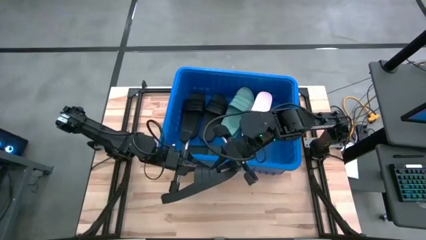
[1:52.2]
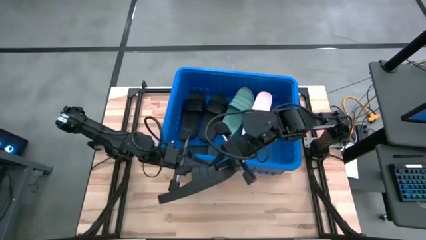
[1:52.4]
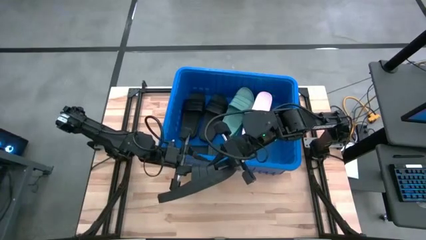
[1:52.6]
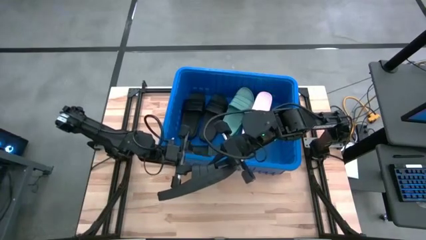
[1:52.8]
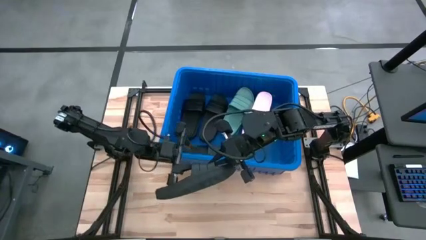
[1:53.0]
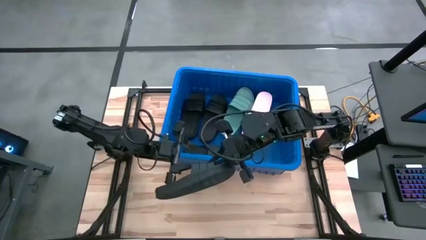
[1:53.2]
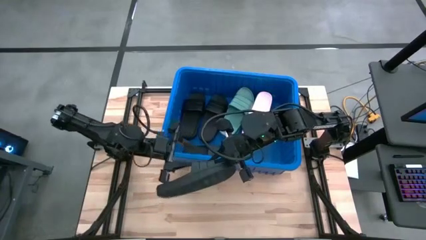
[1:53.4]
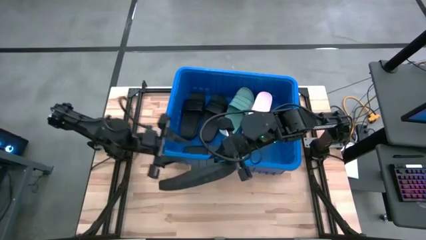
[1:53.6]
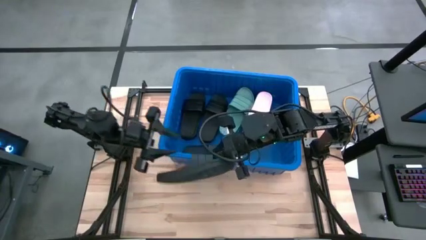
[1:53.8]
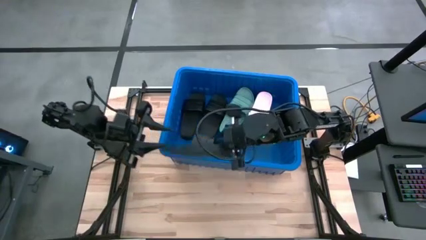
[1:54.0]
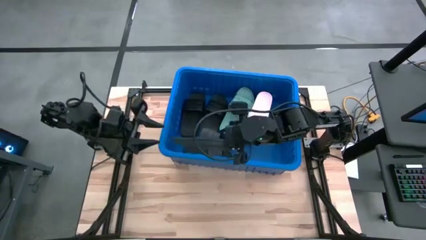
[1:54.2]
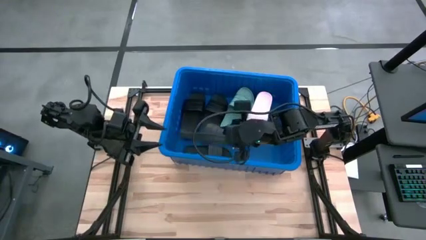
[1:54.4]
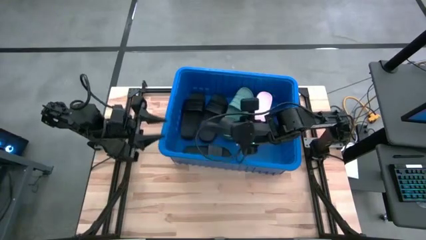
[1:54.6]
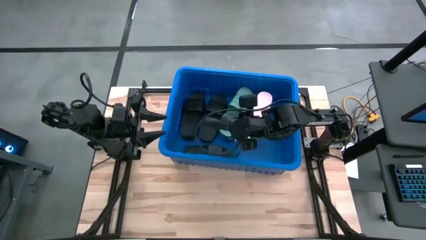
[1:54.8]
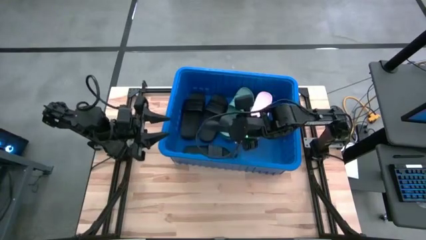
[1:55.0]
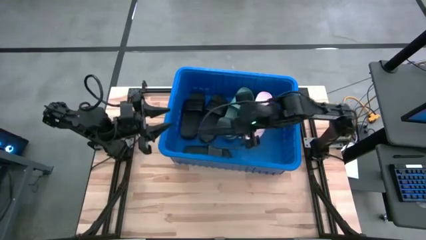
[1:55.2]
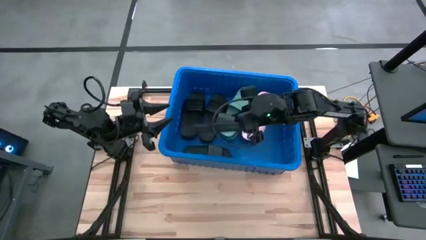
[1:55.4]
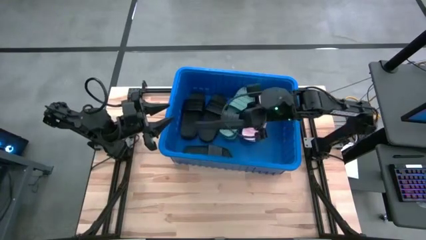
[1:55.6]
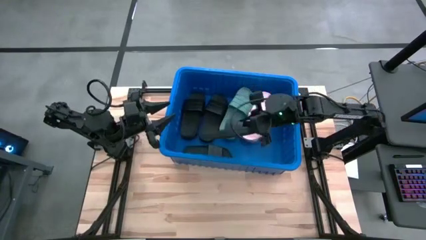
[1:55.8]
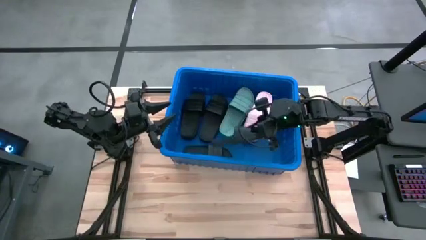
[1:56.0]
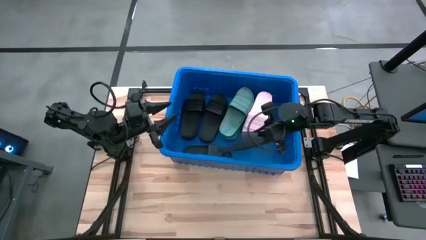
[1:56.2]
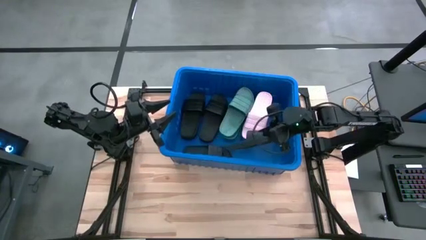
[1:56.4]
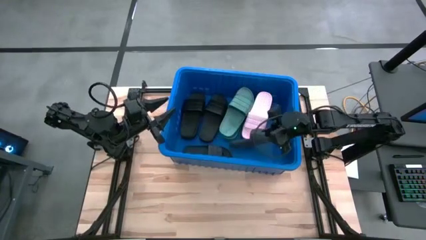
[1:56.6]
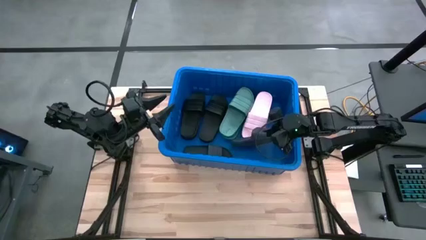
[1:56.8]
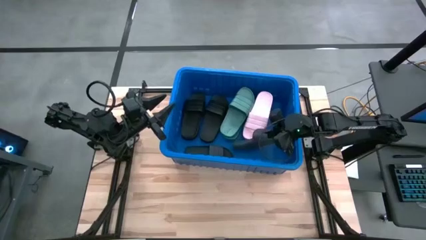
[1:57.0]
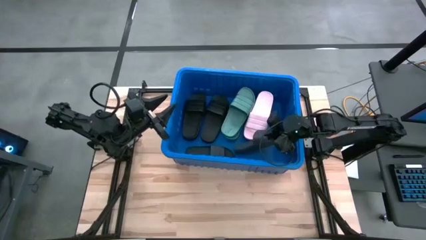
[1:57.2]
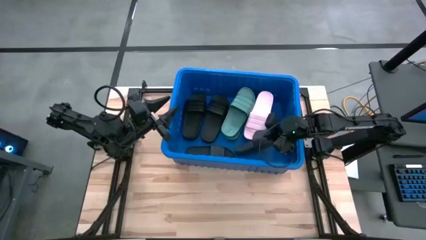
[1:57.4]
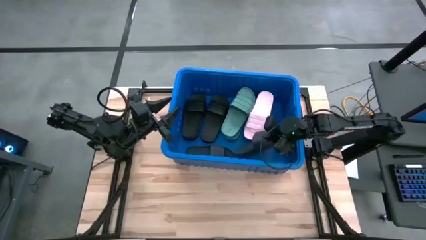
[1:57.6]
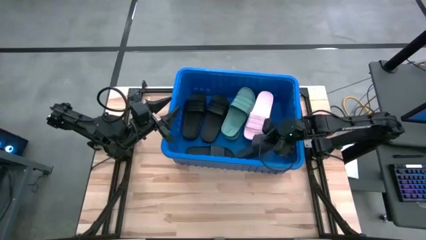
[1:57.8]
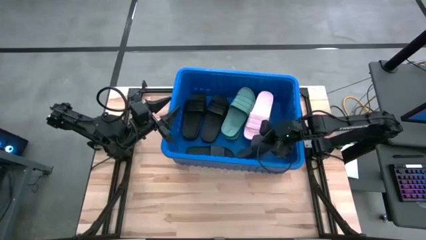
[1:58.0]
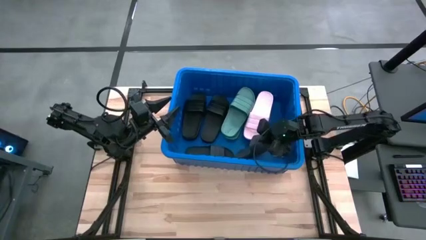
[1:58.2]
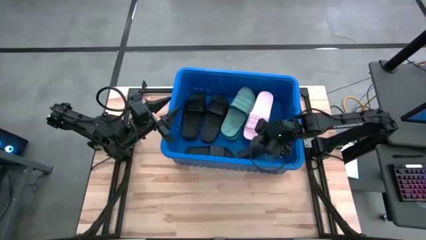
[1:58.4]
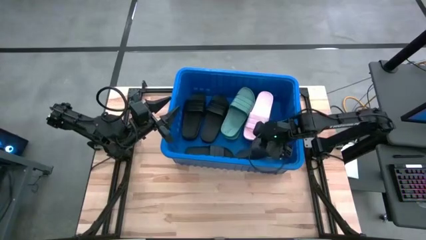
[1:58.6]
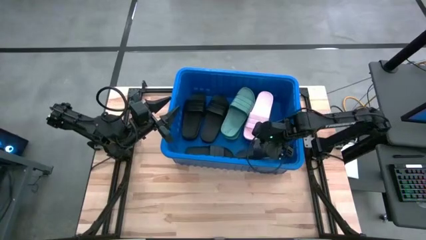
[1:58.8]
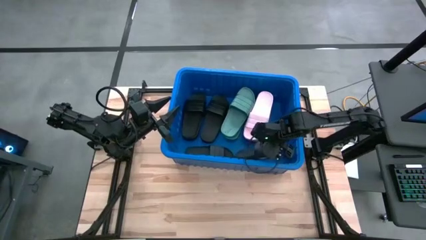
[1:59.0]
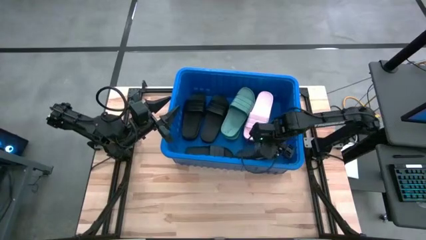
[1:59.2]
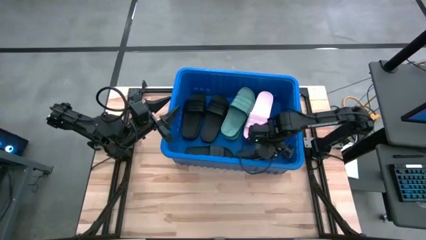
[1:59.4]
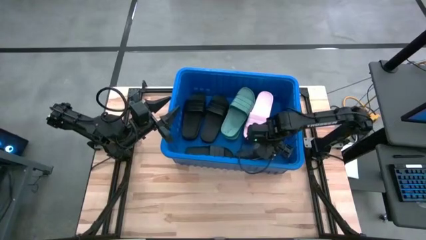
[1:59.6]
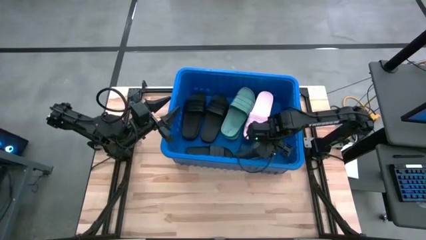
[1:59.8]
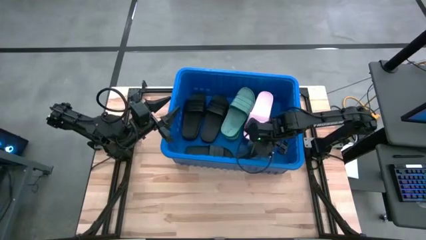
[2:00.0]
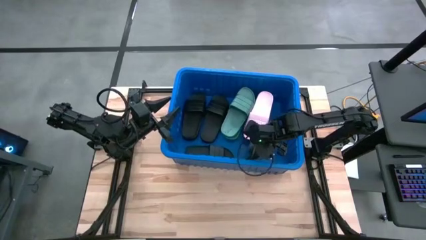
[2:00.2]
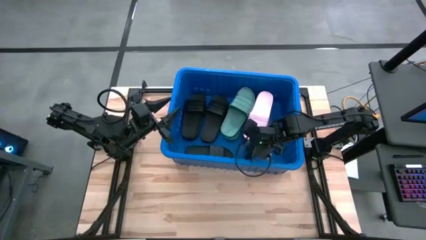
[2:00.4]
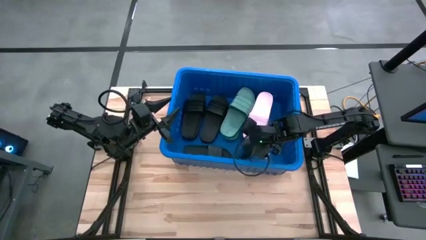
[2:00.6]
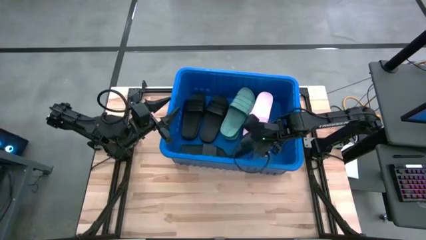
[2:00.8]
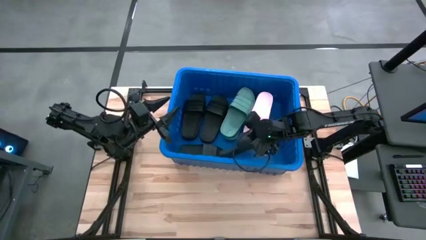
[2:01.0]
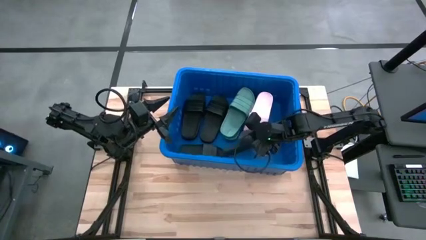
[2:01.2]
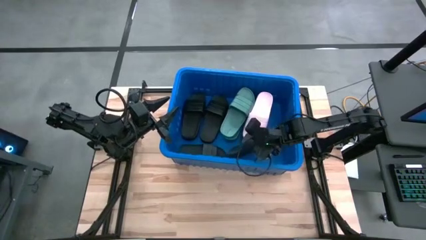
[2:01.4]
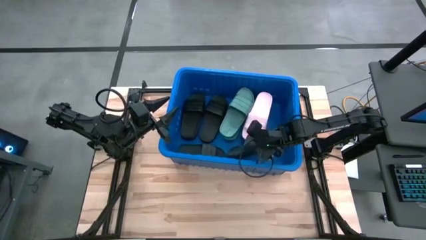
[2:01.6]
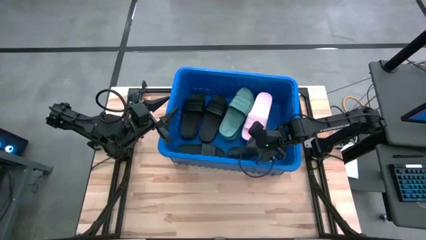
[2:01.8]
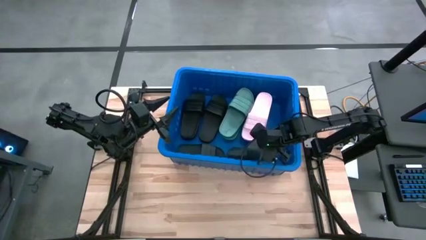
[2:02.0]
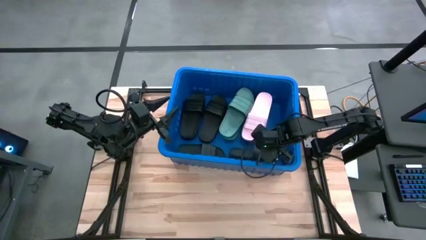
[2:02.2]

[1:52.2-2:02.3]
Task: Pick and place slides into bin
Put the black slide into the blue bin
